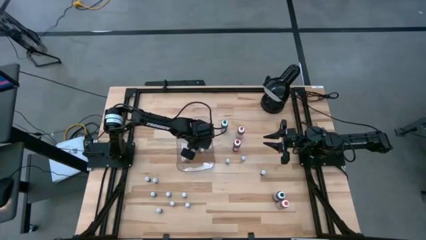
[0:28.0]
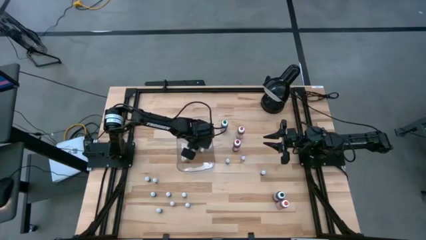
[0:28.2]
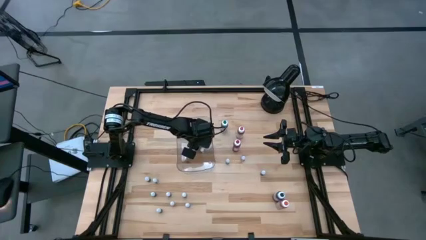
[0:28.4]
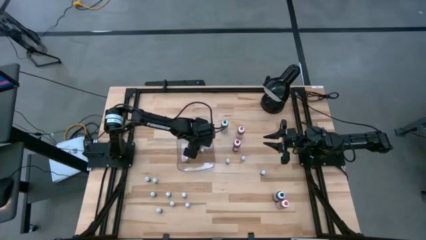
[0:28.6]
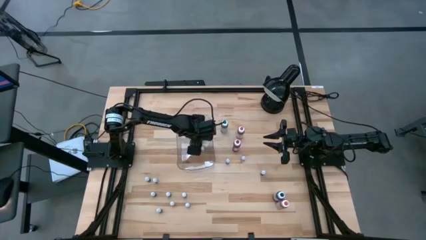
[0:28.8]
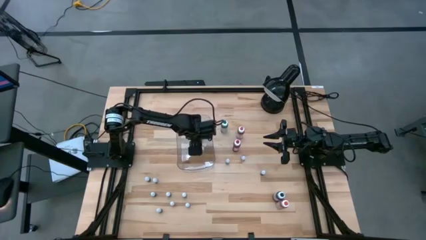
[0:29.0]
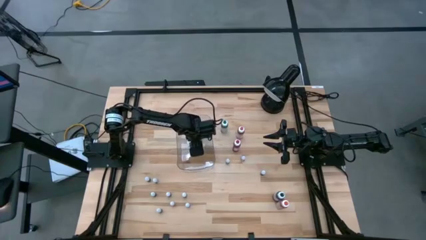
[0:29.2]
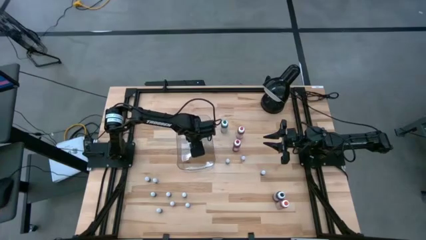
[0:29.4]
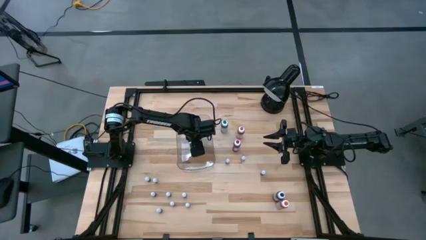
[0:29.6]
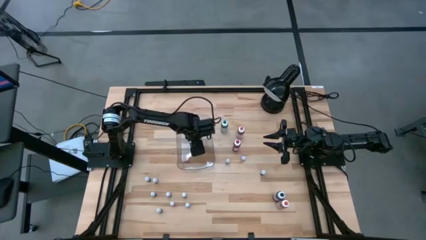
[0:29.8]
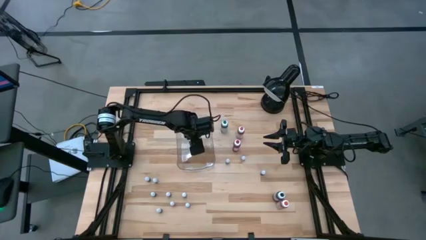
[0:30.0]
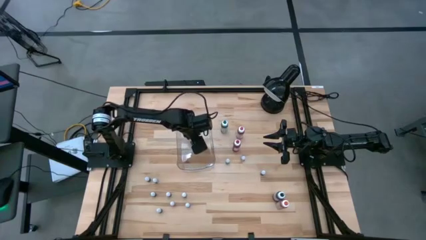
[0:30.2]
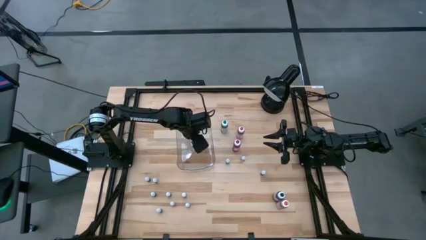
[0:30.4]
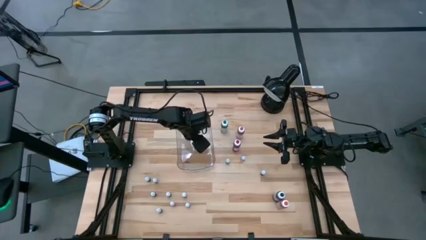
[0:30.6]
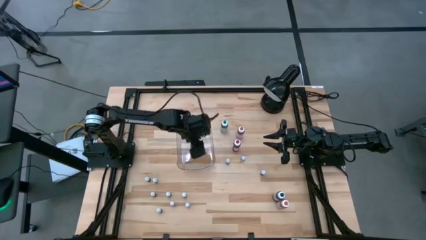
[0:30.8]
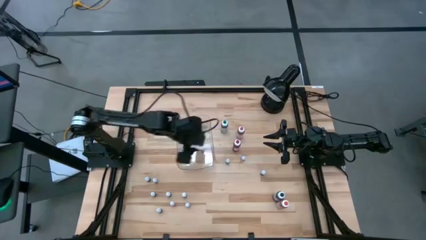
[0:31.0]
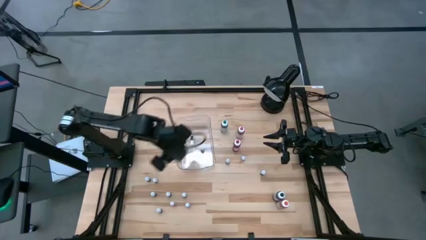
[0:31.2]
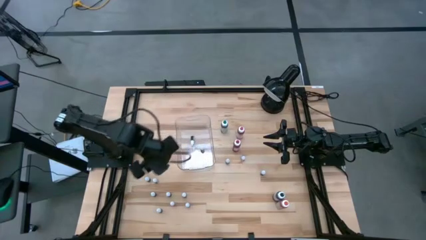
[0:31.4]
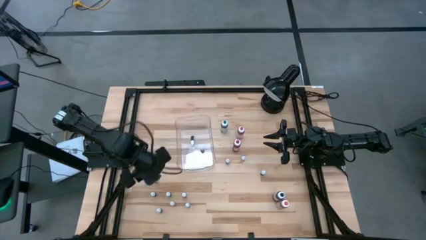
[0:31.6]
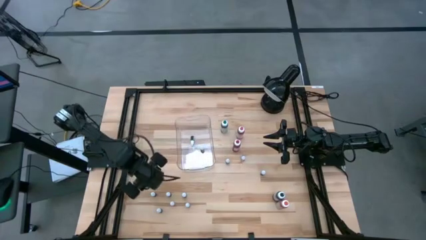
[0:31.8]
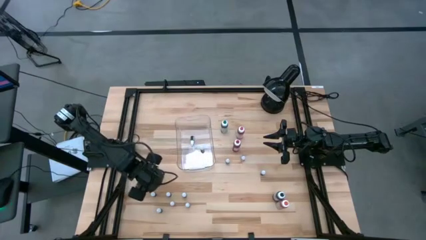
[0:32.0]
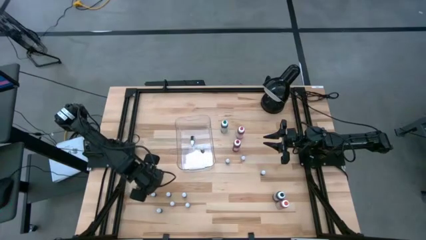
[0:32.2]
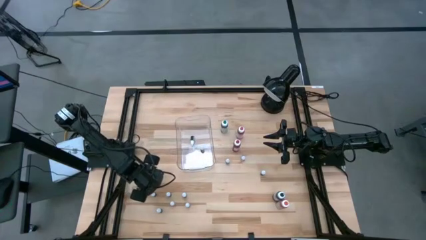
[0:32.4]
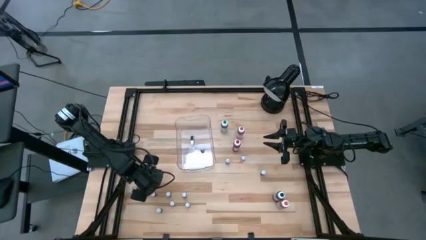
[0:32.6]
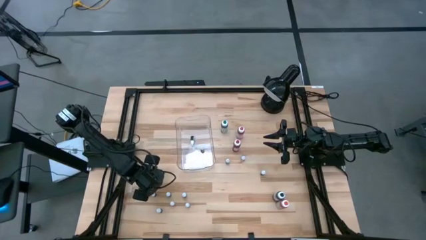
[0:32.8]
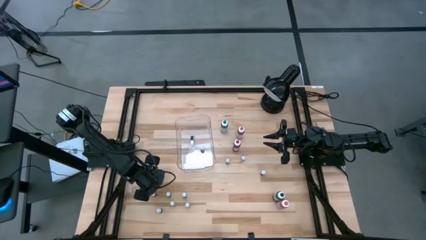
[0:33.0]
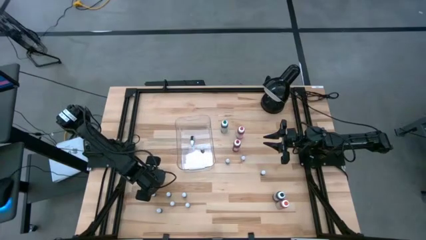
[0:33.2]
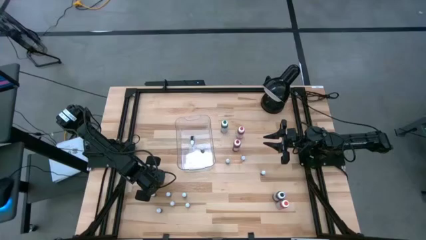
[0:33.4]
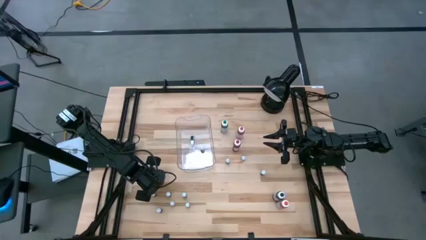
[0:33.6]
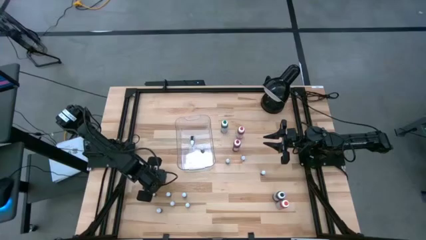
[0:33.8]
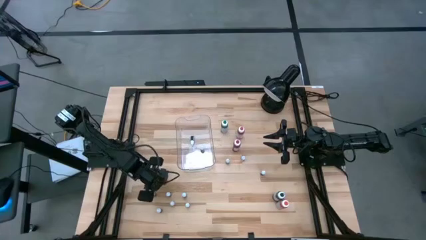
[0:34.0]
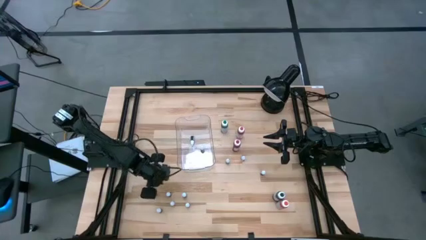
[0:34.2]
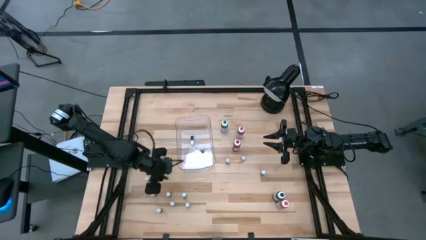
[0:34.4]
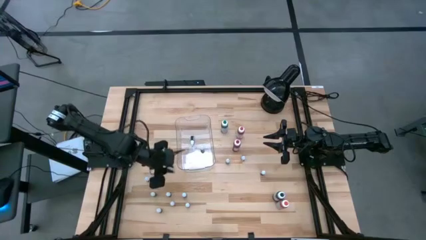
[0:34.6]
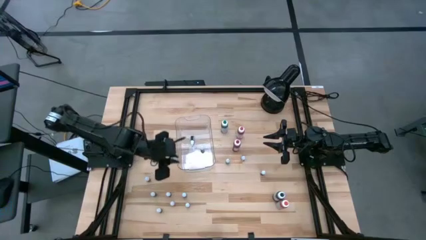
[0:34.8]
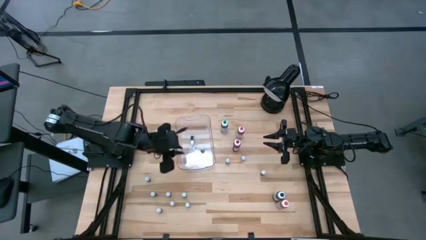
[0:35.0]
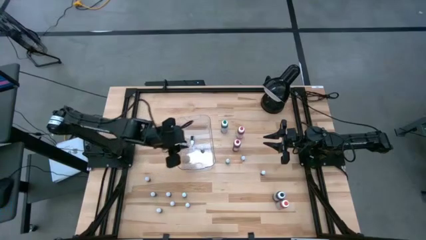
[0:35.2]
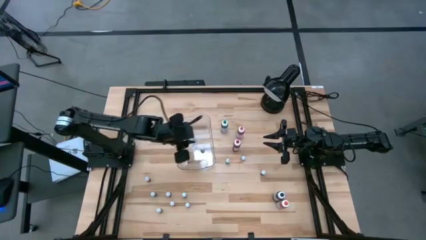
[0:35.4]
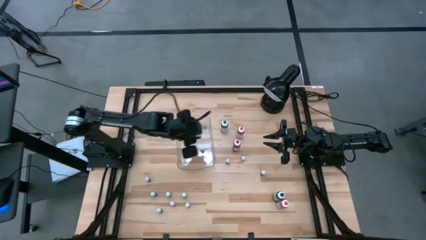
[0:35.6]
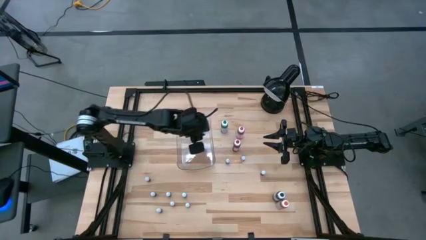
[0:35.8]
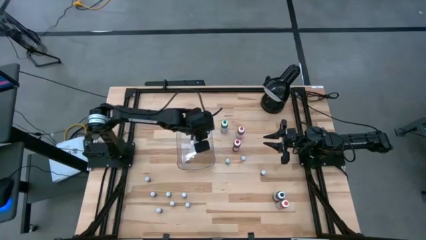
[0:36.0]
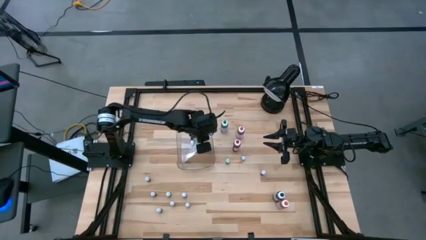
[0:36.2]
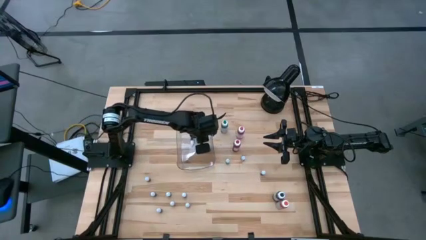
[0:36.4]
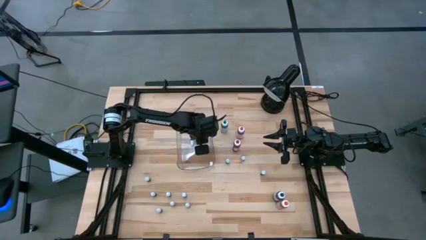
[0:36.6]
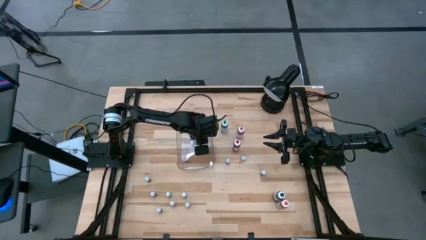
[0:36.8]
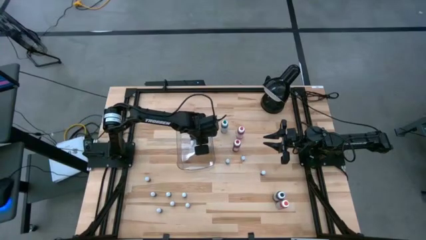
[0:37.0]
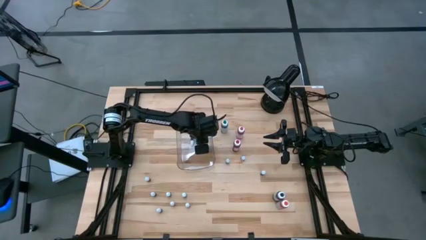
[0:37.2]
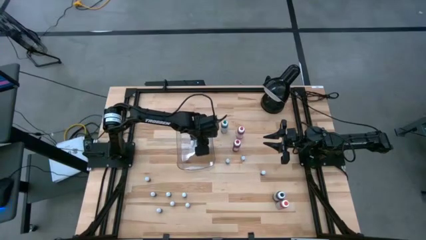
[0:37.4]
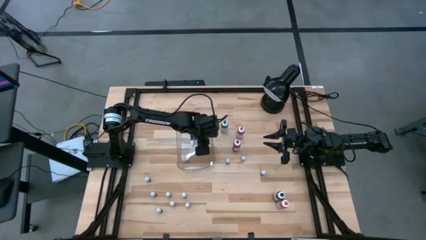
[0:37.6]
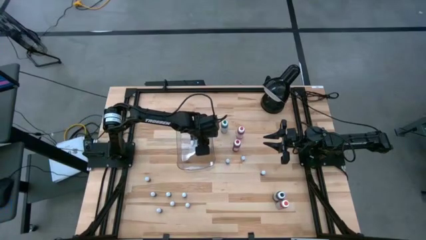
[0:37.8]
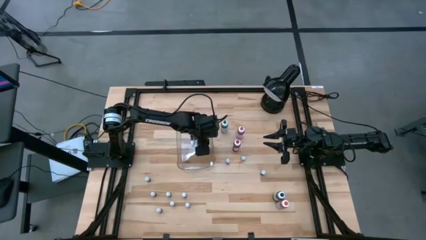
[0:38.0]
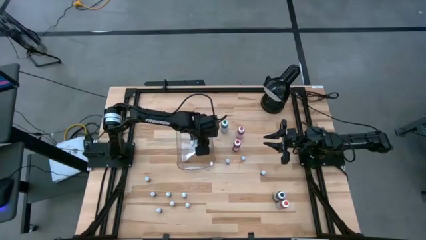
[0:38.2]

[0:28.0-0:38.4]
Task: Pick & Place food coloring
Put the right small violet food coloring bottle into the transparent bin
